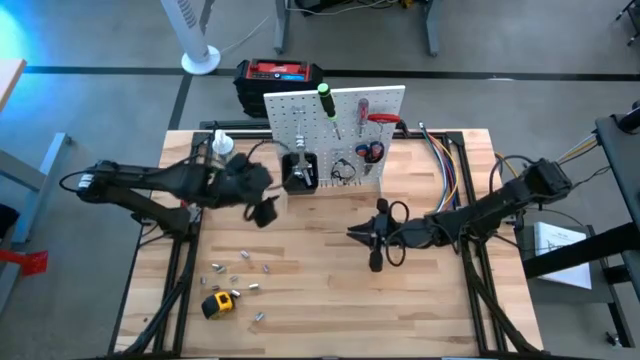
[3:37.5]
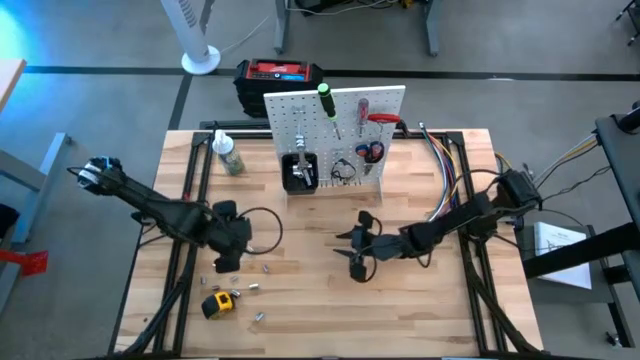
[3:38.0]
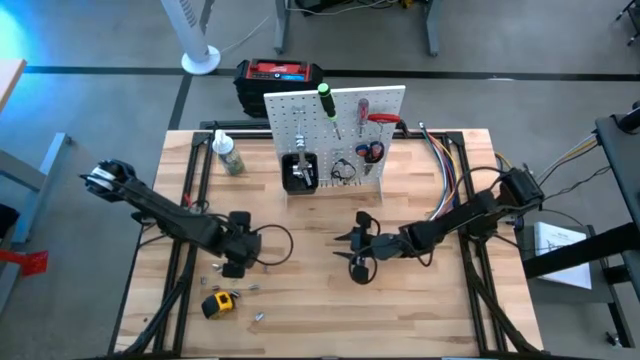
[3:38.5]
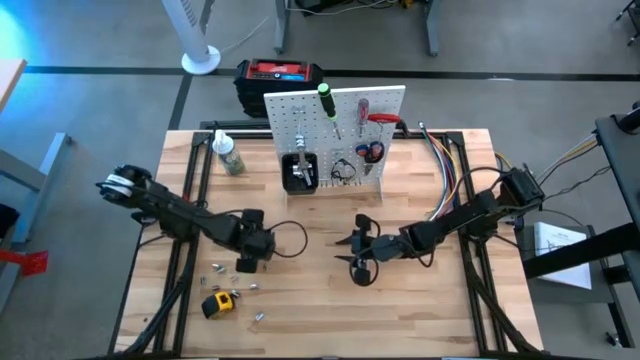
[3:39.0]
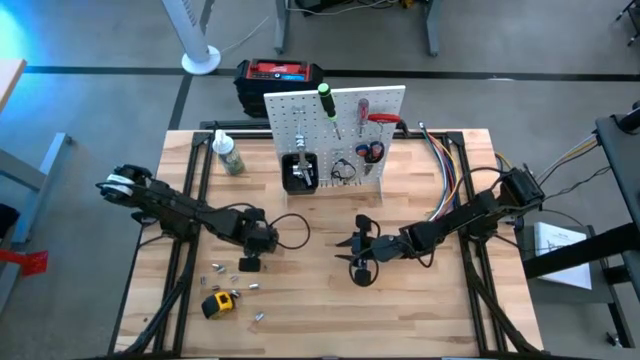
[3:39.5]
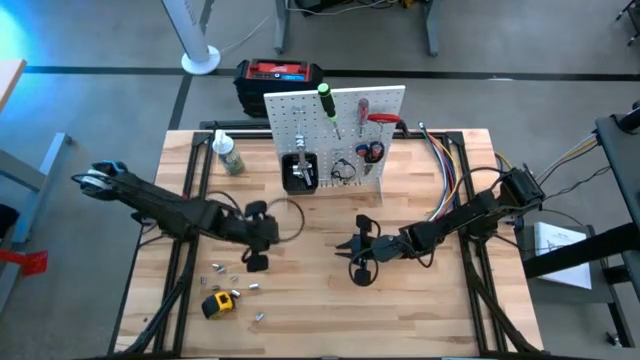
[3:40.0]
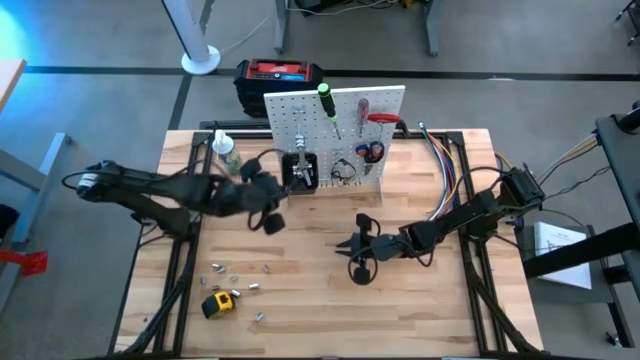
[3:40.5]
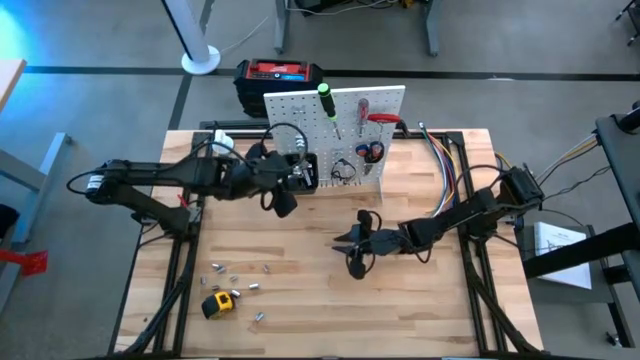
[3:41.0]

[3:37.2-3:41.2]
Task: Hang tools onto peg board
Put the silver socket into the black bin on the pegboard

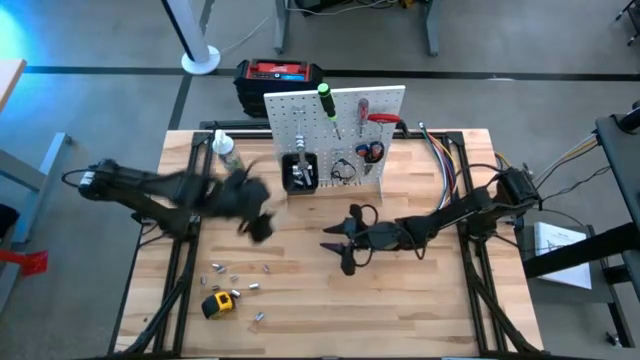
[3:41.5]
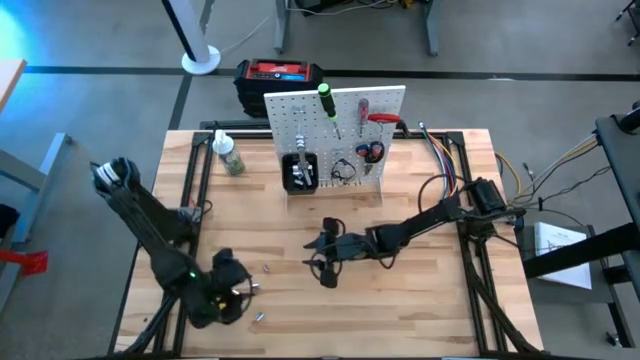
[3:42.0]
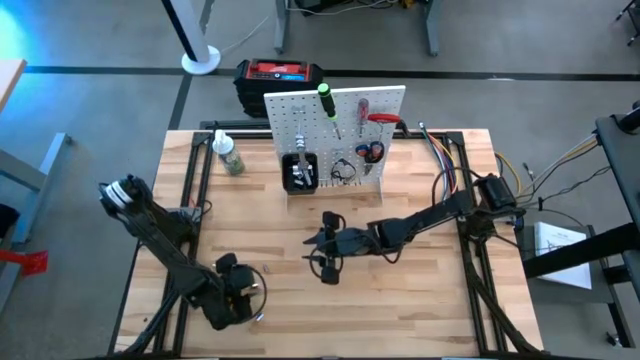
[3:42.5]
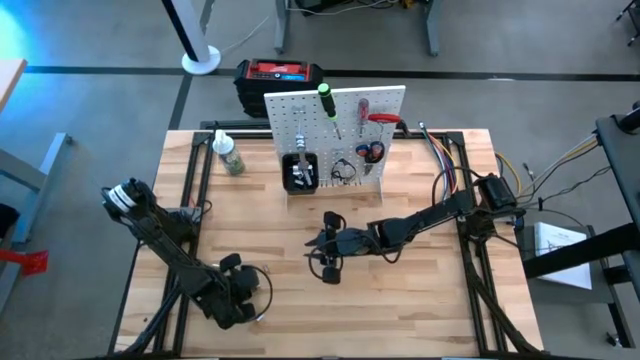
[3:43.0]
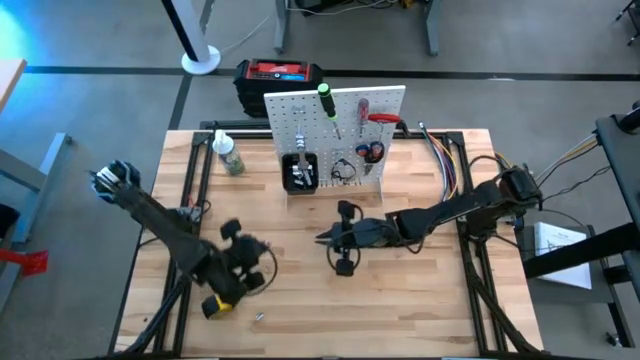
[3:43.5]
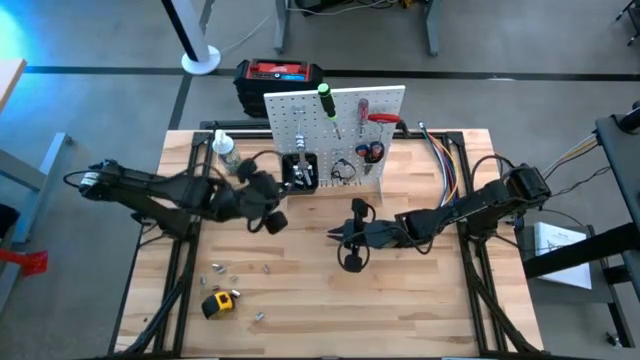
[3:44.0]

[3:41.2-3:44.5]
Put the silver socket into the black bin on the pegboard

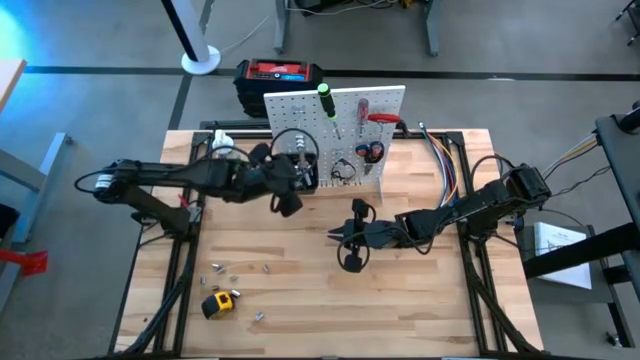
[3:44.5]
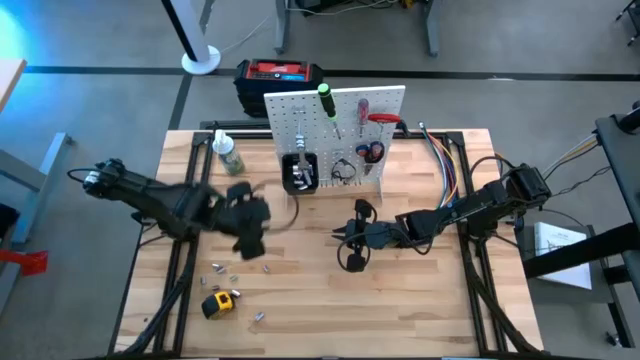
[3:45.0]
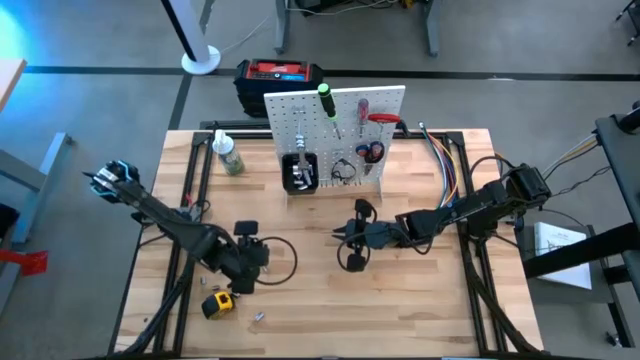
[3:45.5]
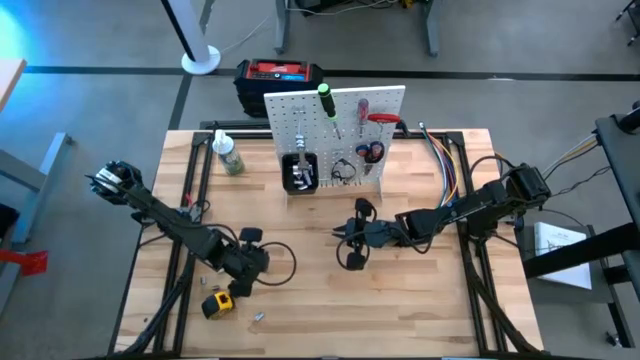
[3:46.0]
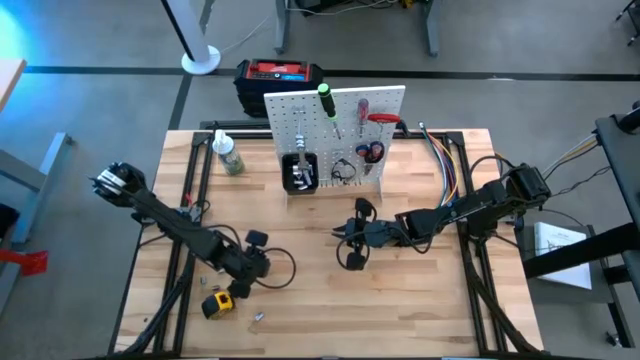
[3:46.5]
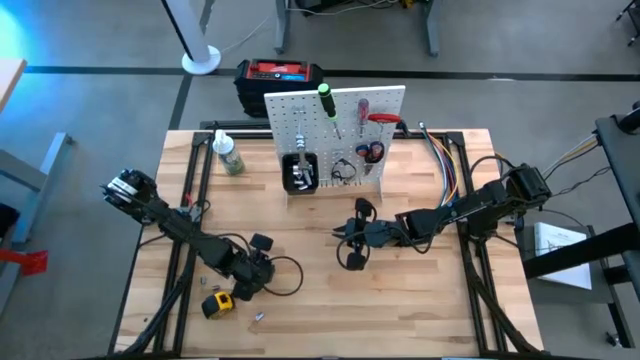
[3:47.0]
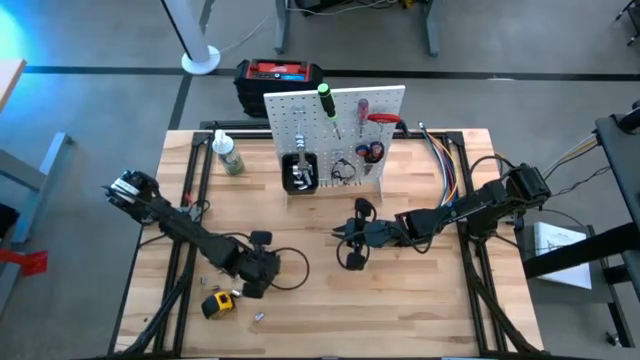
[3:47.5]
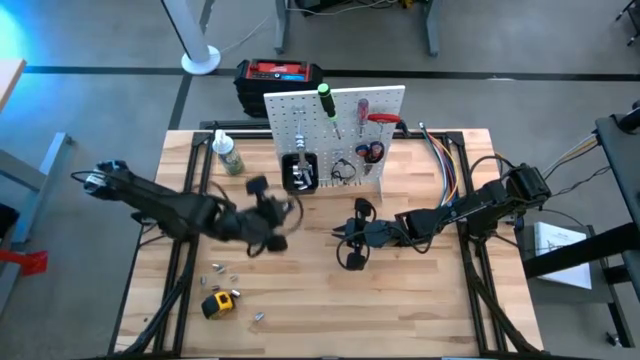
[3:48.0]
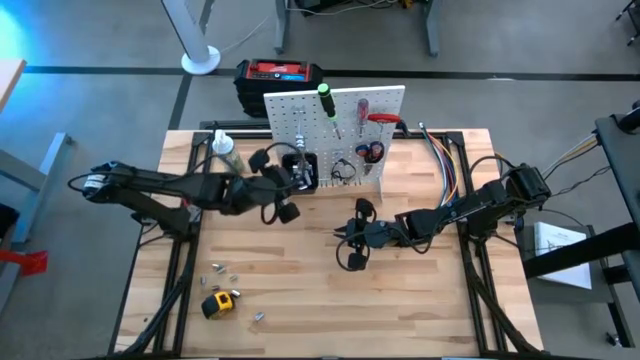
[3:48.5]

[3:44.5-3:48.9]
Put the silver socket into the black bin on the pegboard

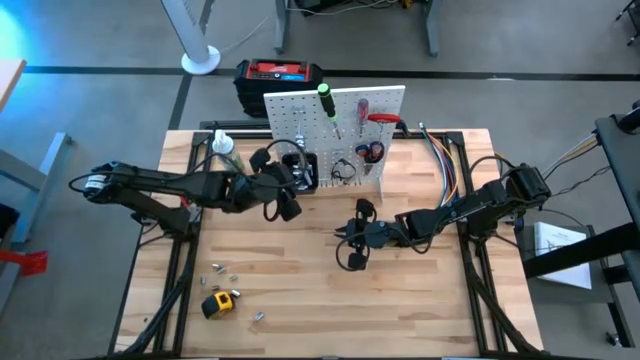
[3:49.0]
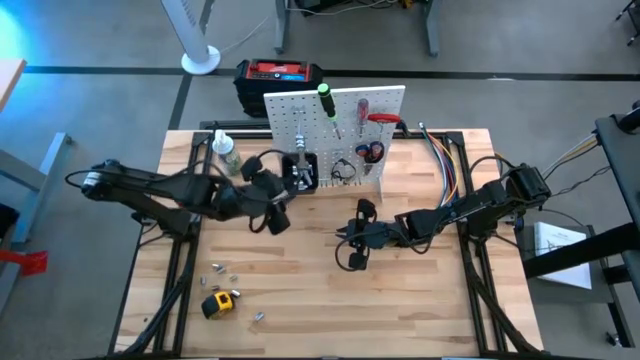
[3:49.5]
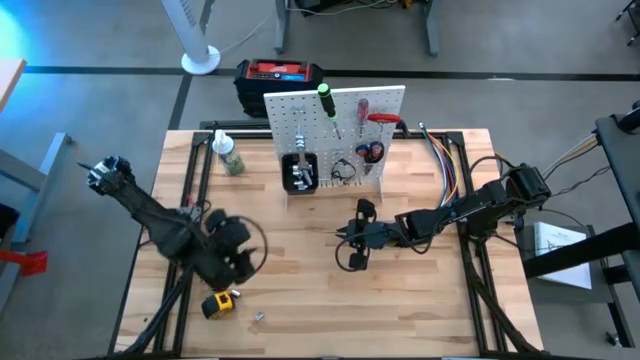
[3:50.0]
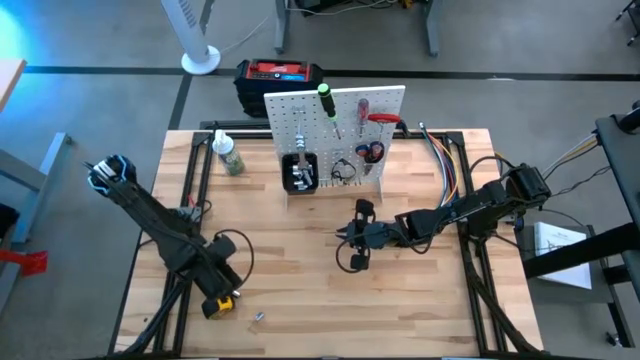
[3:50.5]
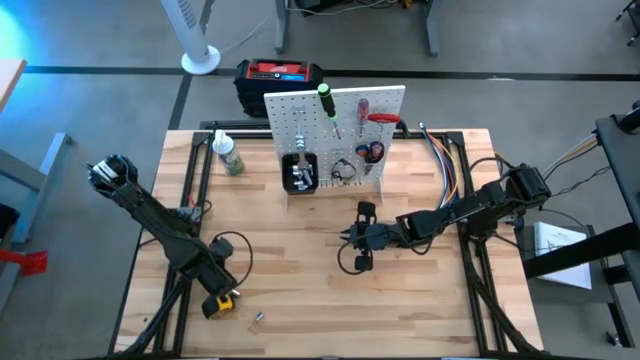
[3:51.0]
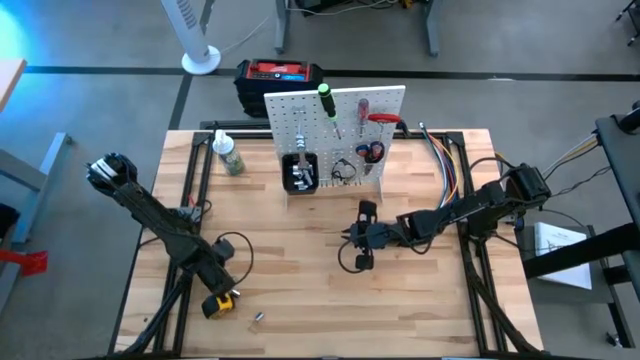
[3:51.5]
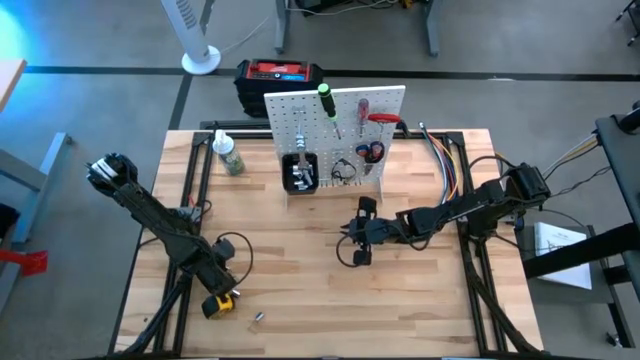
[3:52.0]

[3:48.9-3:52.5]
Put the silver socket into the black bin on the pegboard

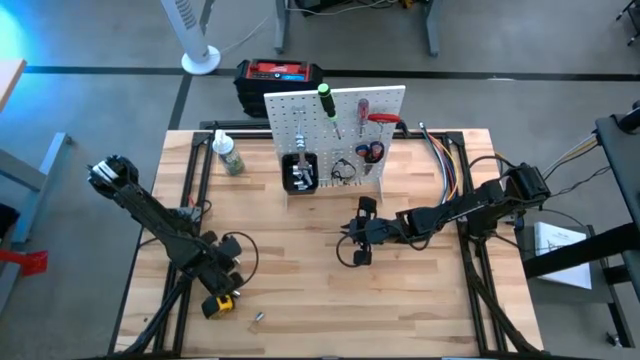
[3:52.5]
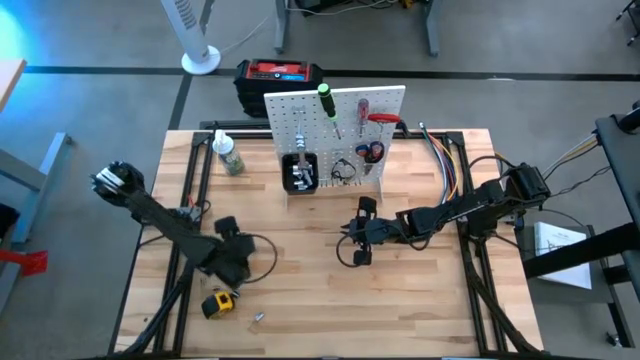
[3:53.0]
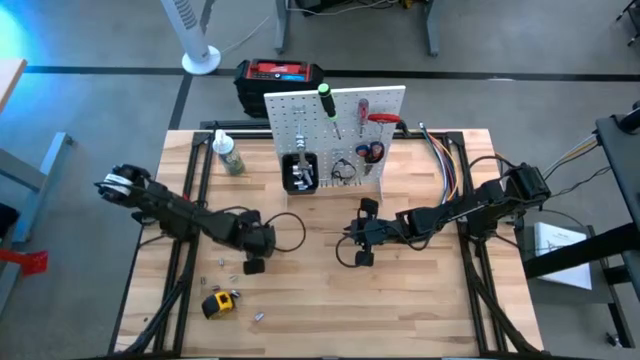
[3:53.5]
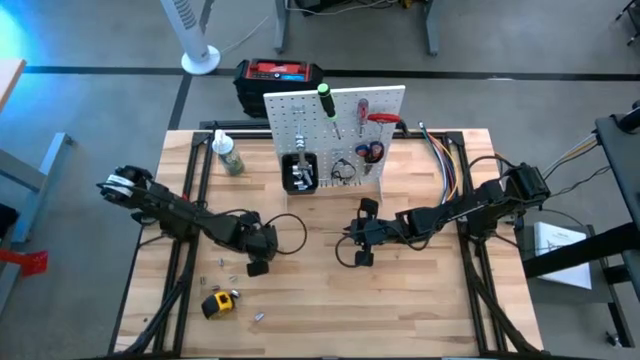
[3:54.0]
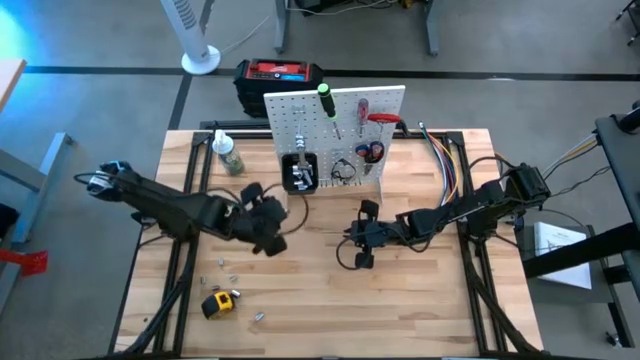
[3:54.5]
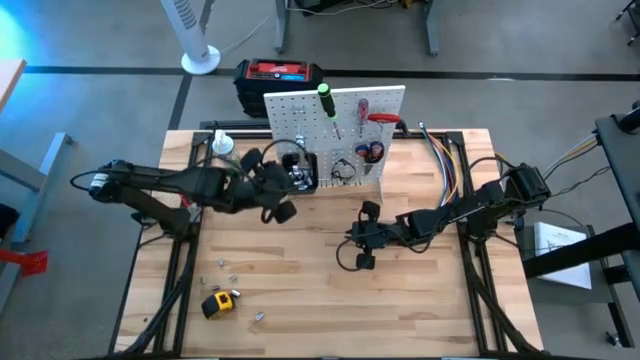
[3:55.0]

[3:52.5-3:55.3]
Put the silver socket into the black bin on the pegboard

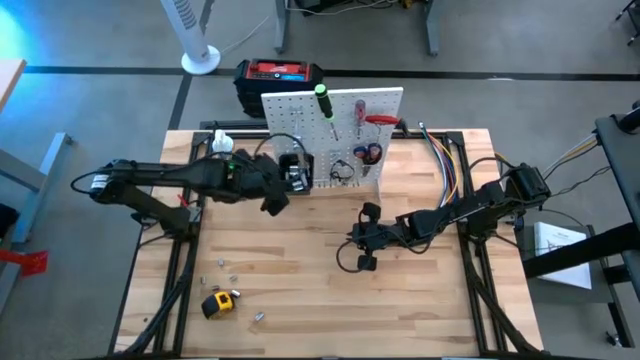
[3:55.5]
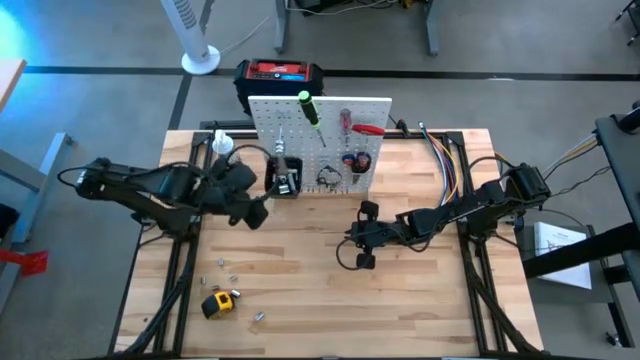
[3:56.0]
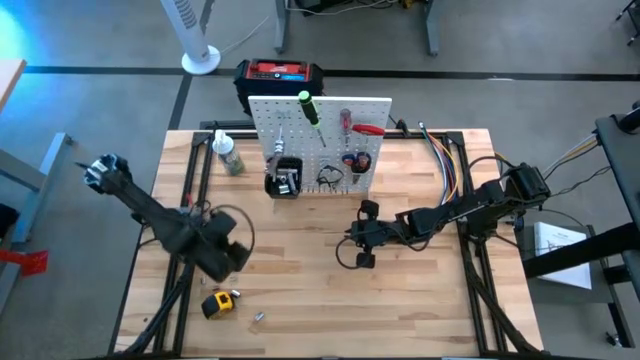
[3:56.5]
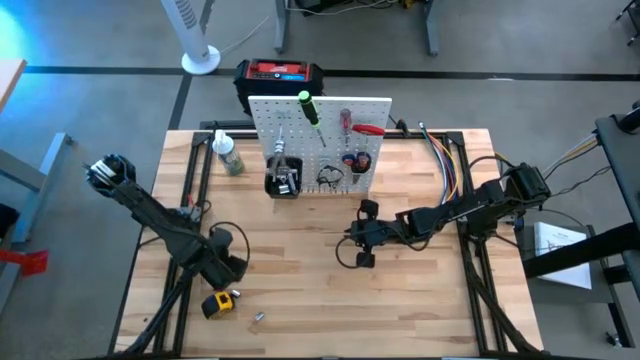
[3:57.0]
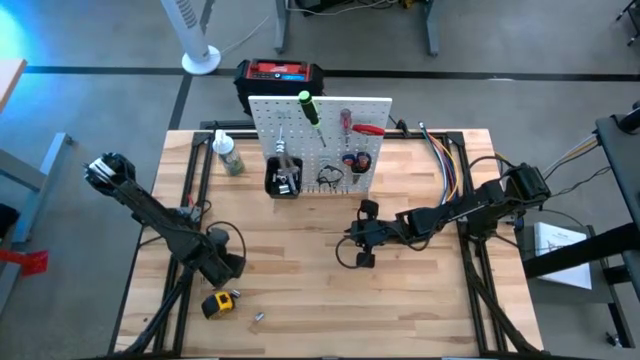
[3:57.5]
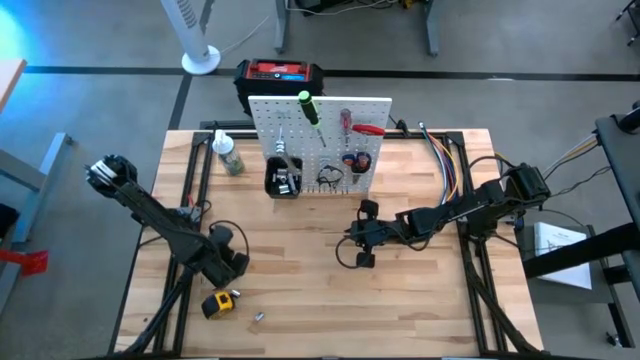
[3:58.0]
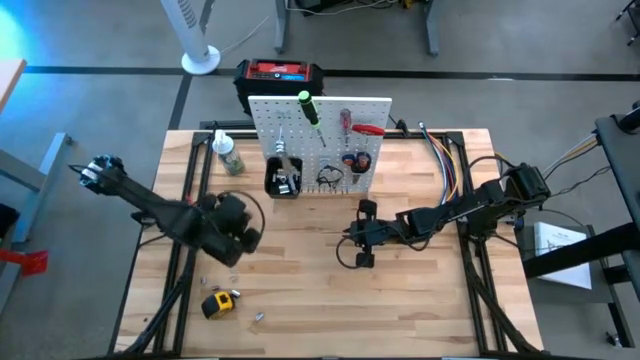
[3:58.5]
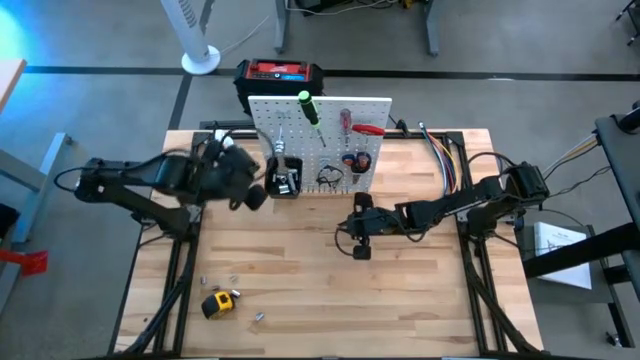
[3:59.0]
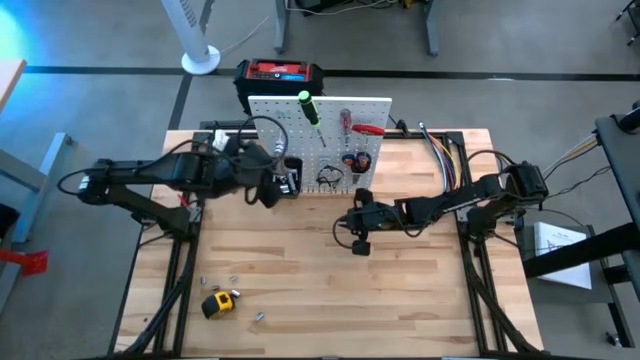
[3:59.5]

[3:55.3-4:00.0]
Put the silver socket into the black bin on the pegboard
